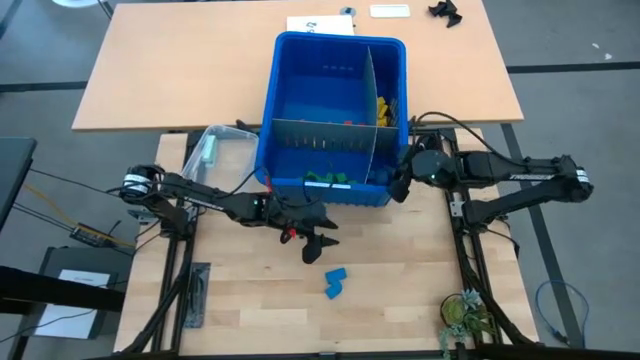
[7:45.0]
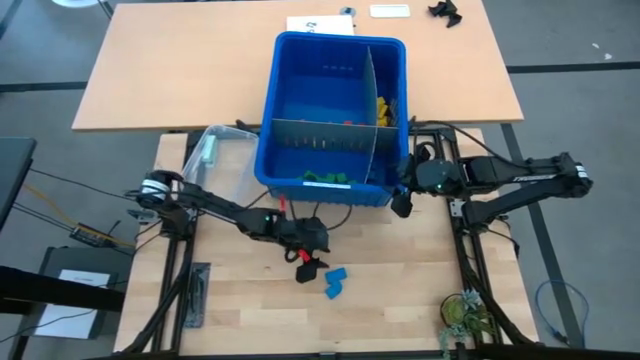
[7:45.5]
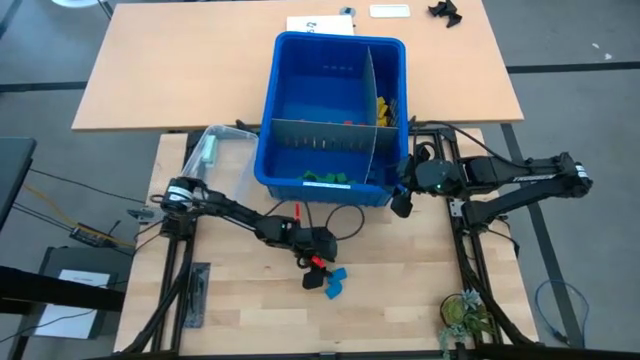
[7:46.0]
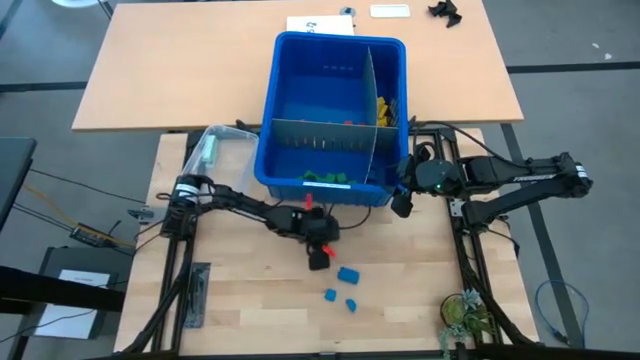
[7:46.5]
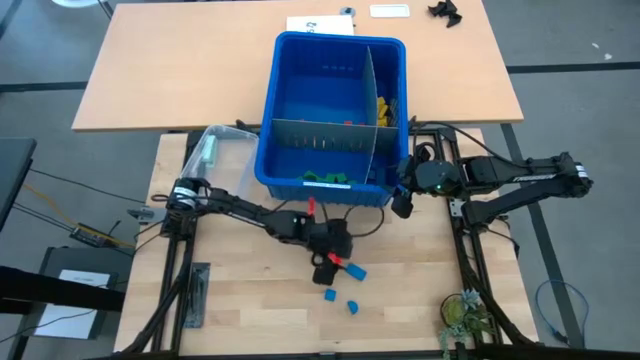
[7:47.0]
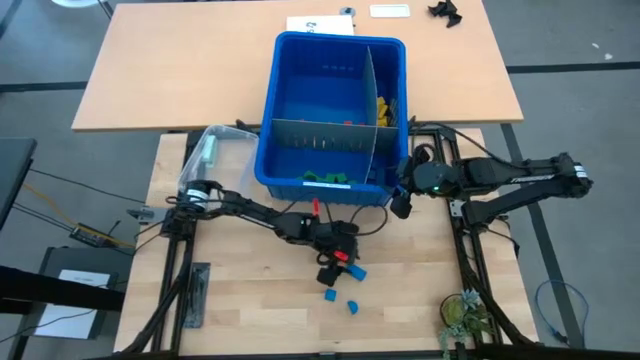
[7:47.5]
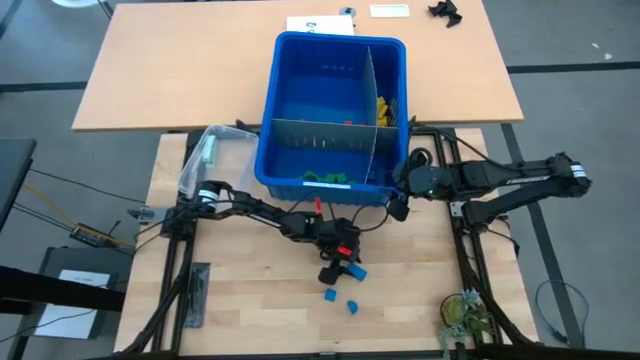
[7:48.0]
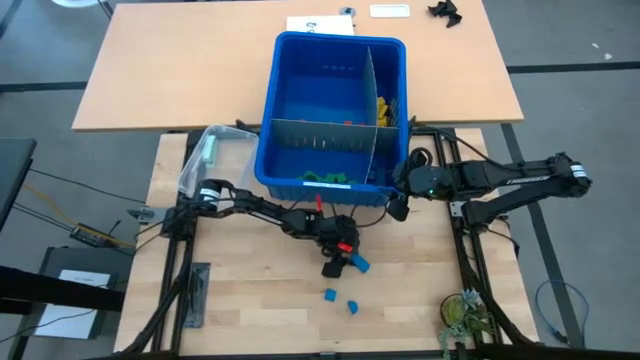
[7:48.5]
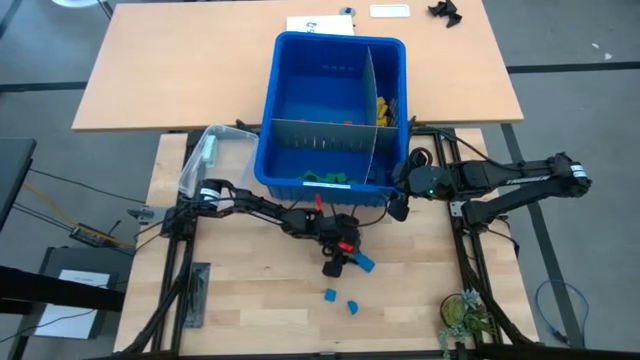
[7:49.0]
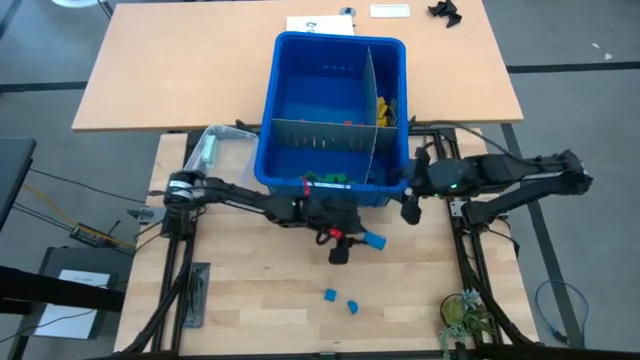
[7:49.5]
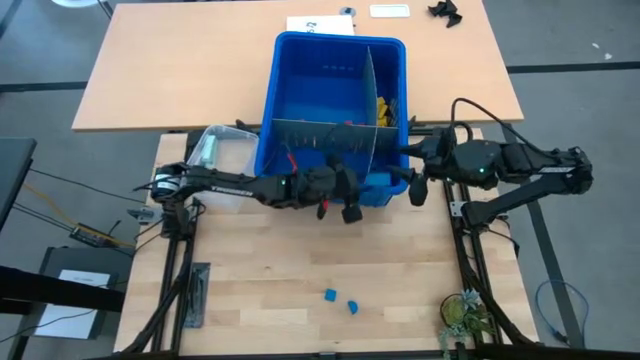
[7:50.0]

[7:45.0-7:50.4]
Task: Sort blocks
Put the blue block into the blue bin

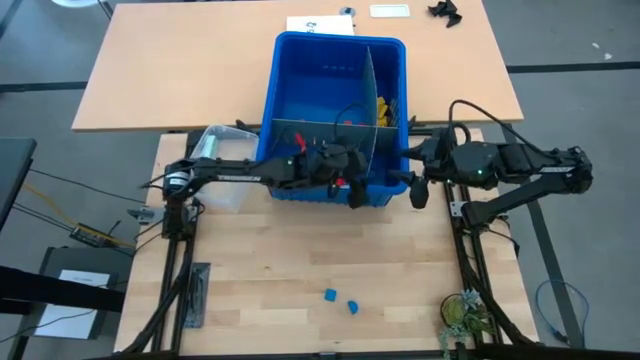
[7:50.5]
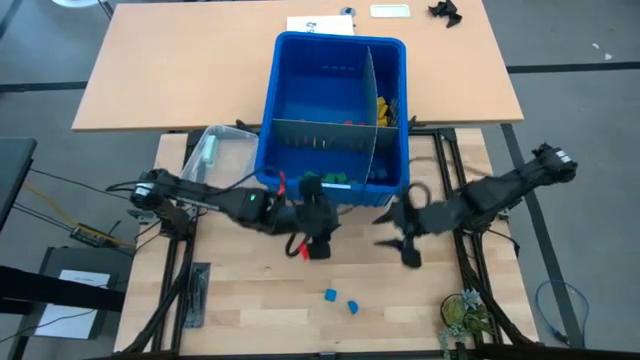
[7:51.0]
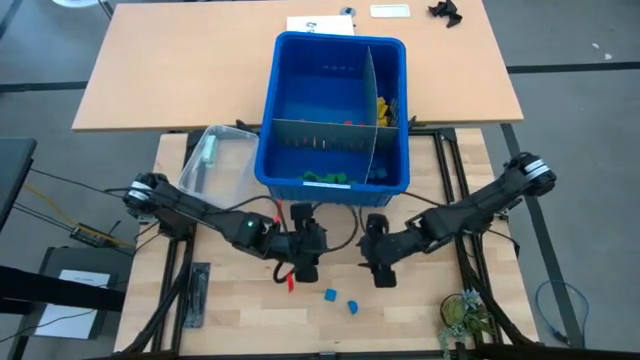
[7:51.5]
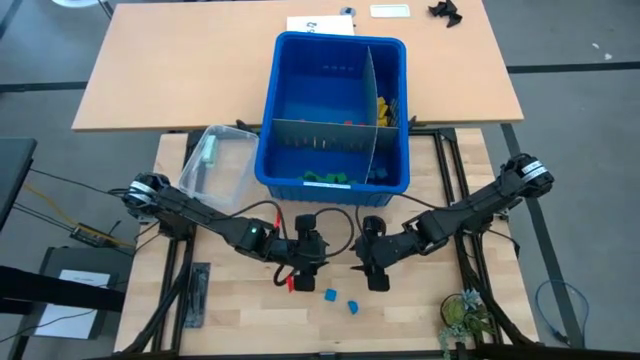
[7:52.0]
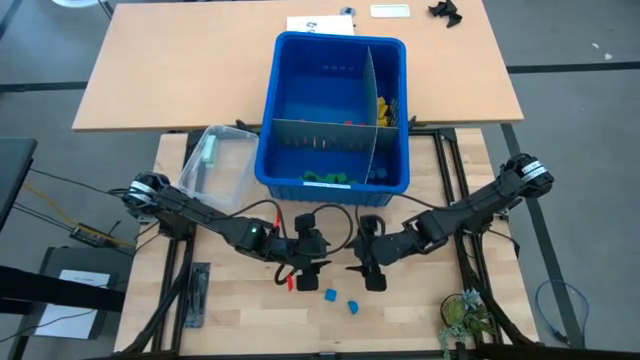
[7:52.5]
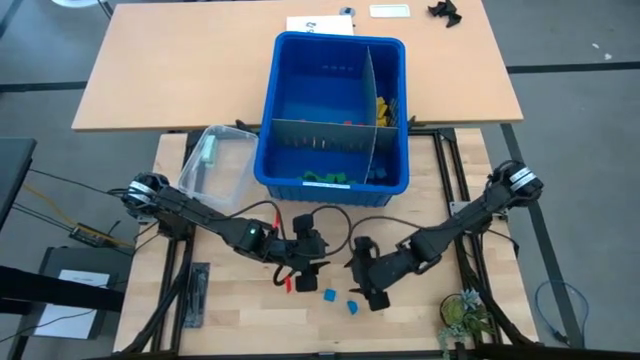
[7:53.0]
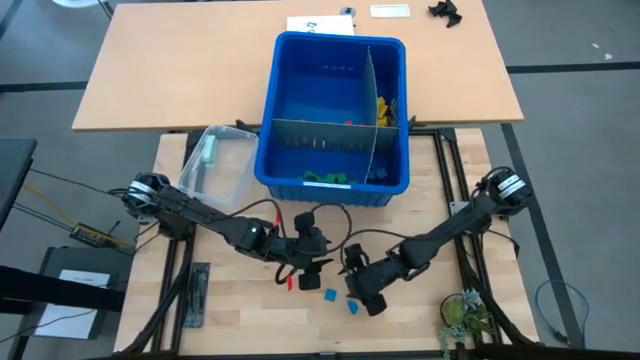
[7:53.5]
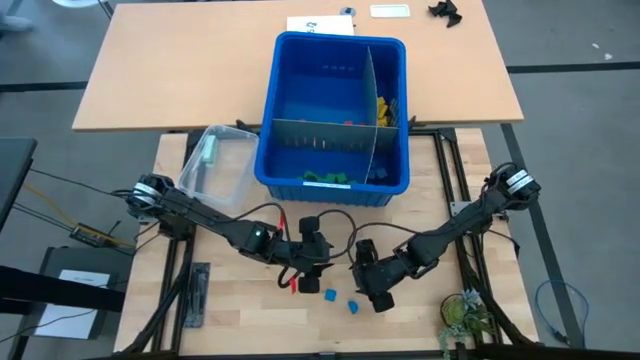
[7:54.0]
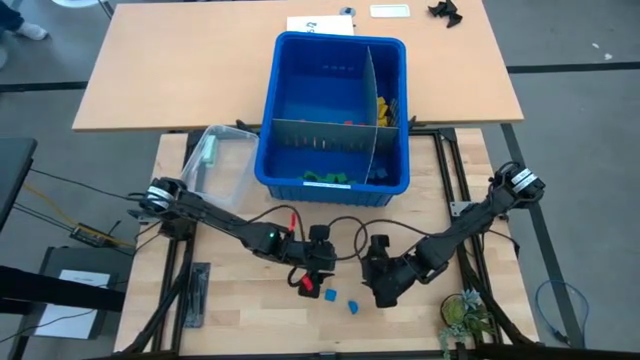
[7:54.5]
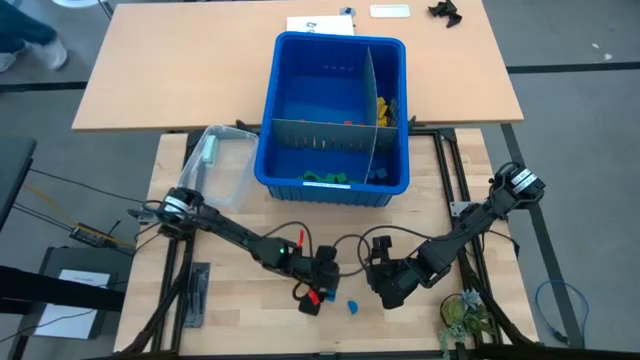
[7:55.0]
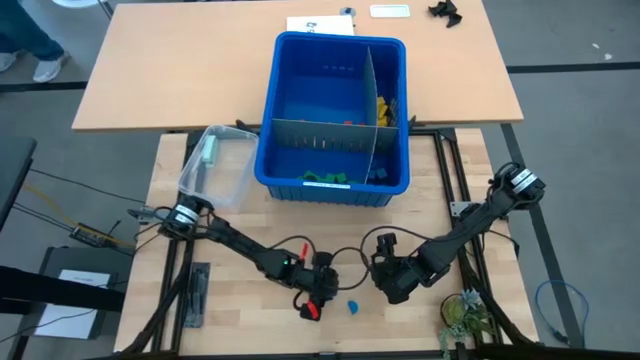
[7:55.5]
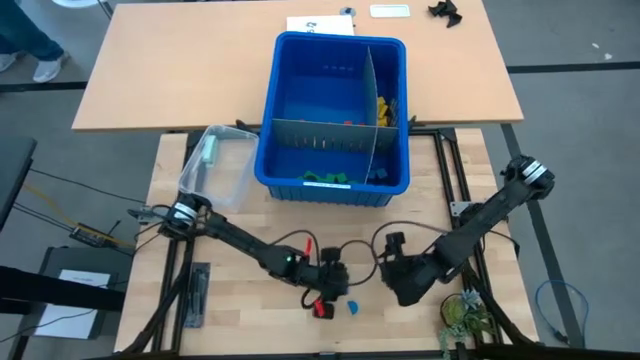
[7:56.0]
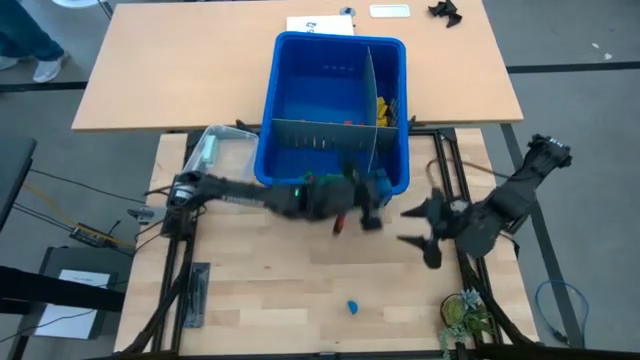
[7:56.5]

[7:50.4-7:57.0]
Put the blue block into the blue bin

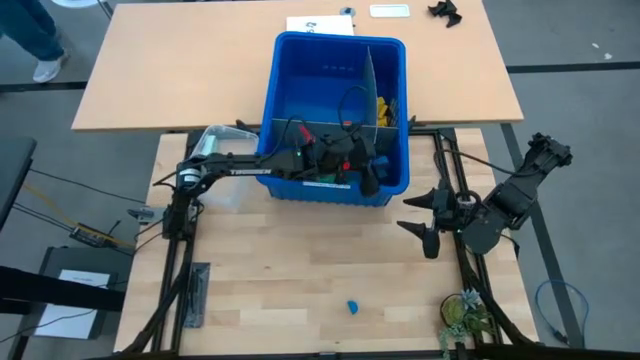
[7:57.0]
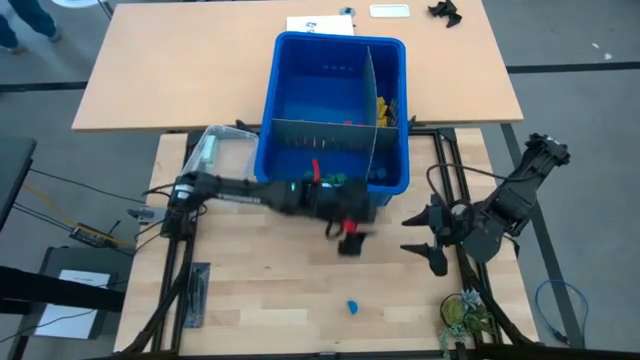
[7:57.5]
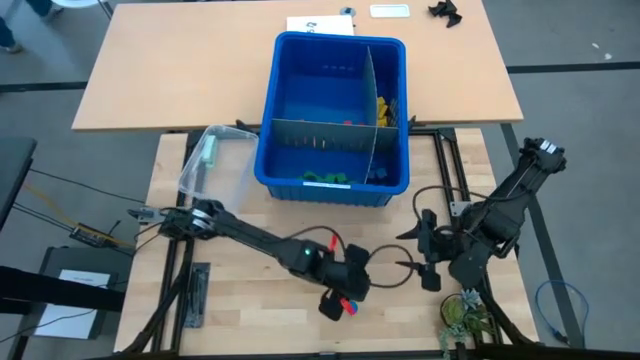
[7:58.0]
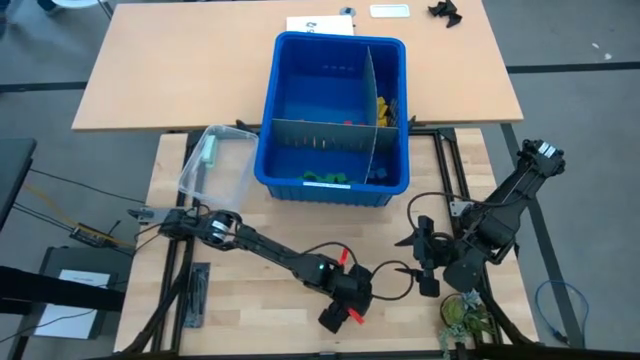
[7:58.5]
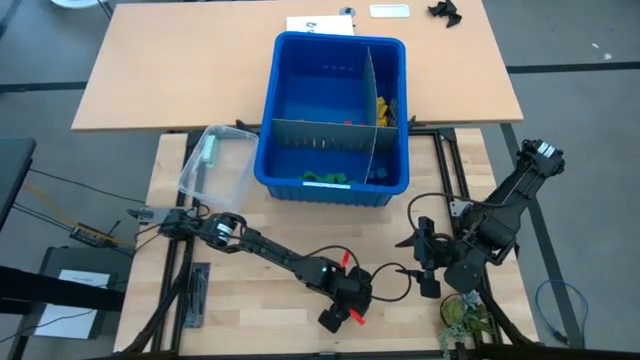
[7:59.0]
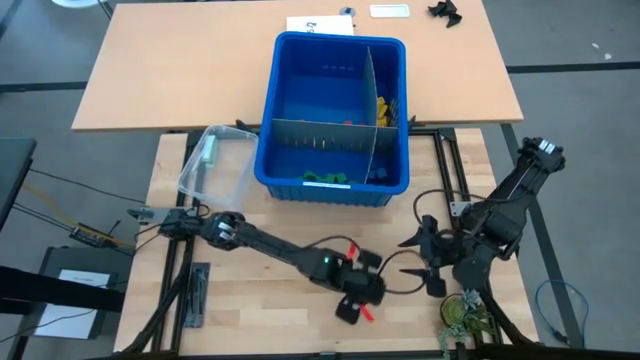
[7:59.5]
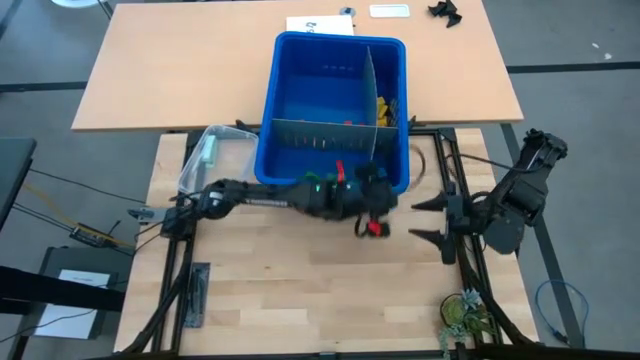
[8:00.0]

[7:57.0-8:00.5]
Put the blue block into the blue bin

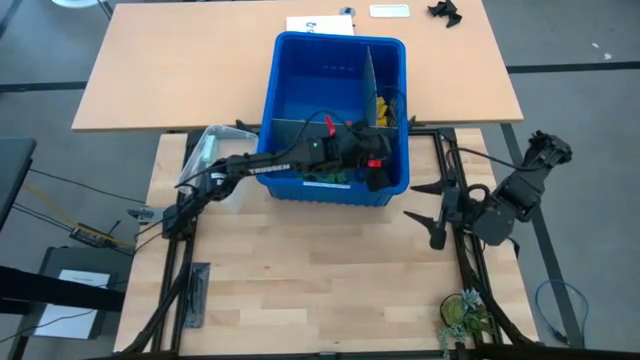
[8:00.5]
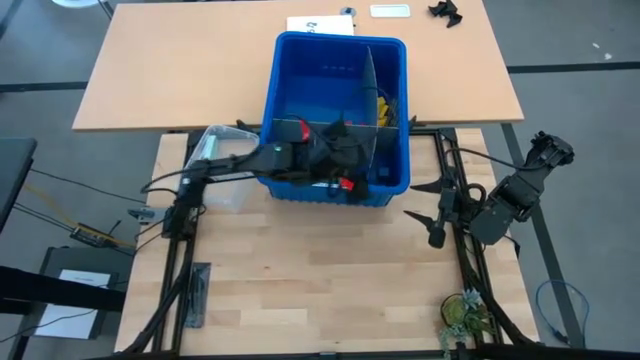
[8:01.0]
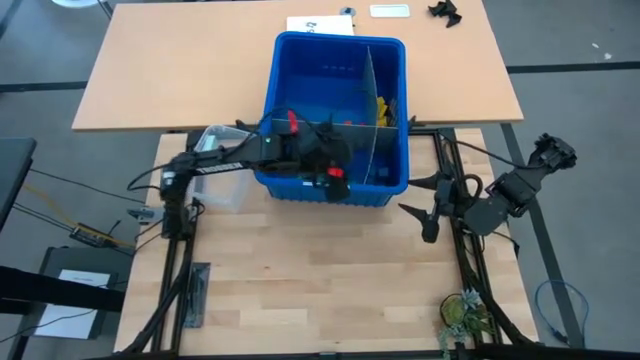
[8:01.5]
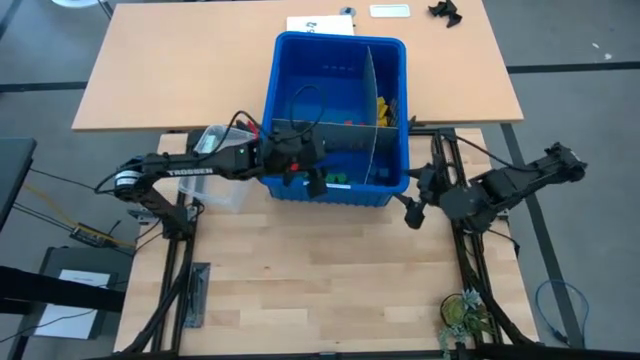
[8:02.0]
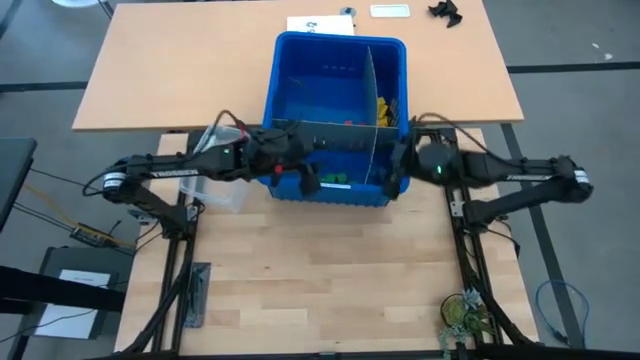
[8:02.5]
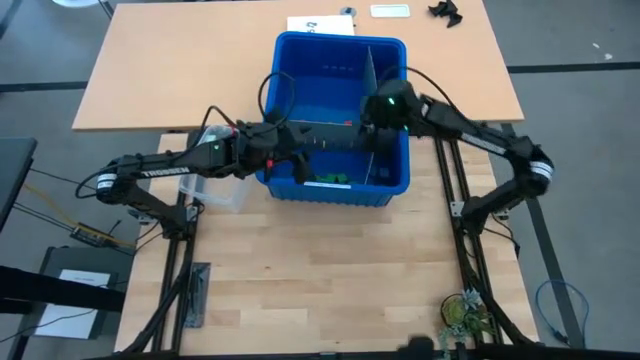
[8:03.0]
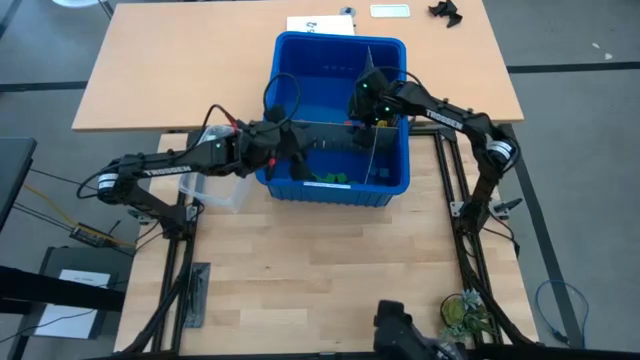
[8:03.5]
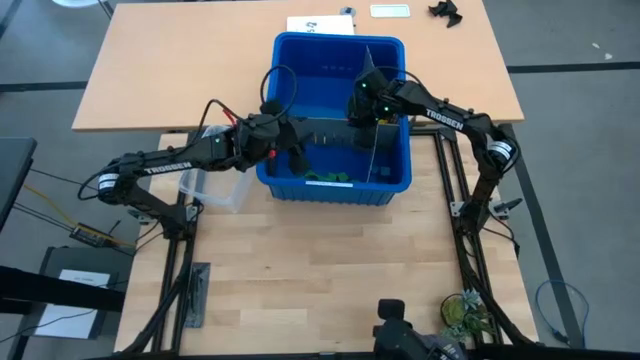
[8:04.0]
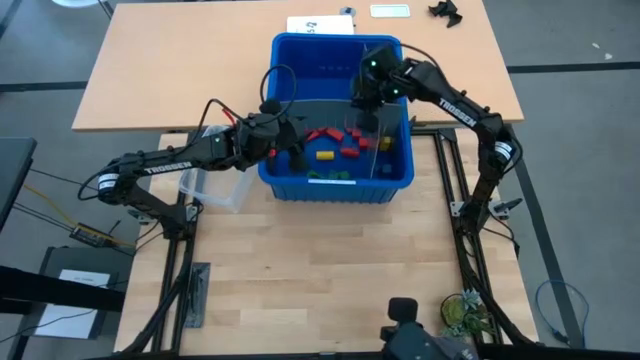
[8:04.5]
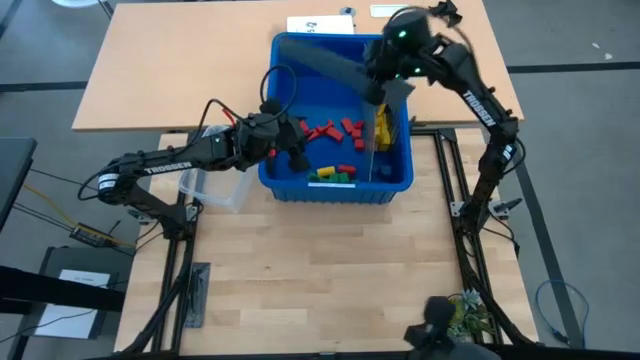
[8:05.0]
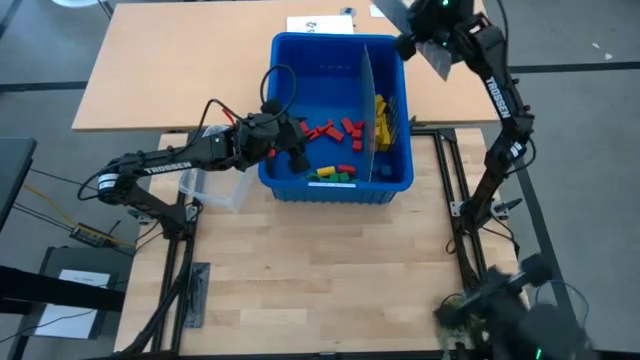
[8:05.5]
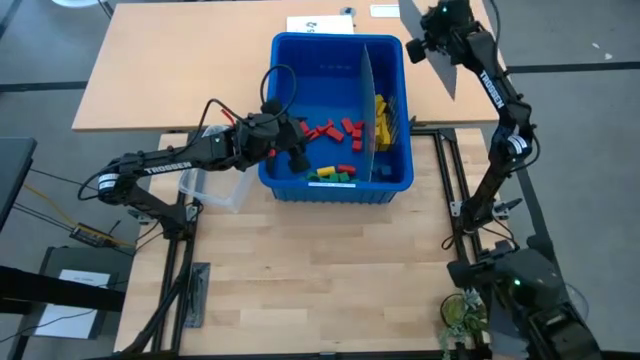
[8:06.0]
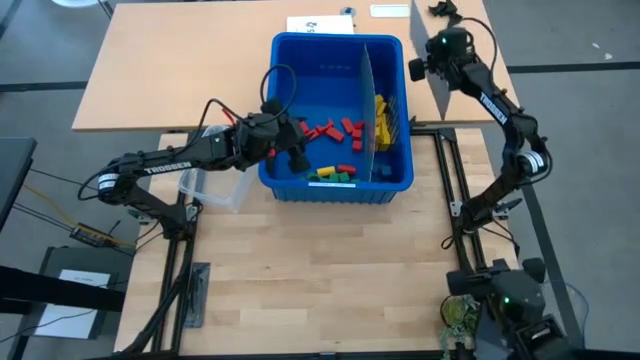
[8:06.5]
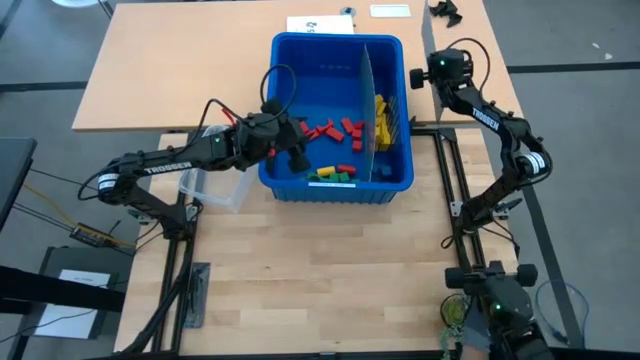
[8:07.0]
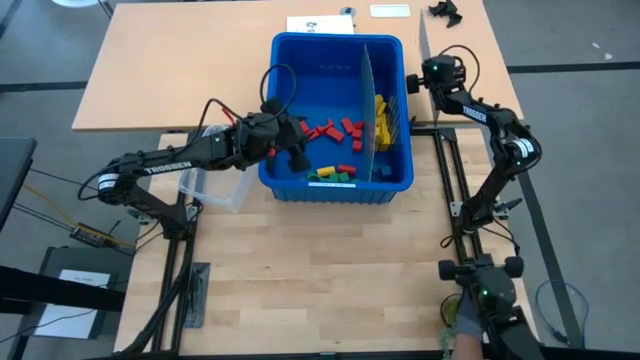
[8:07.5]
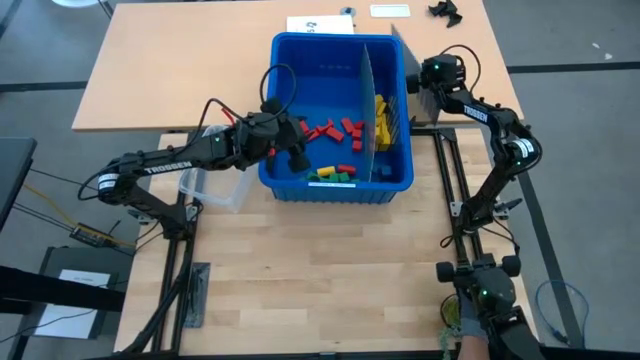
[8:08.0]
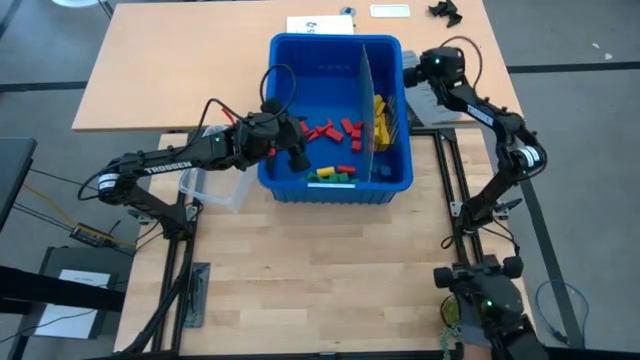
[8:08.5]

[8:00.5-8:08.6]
Remove the bin divider
